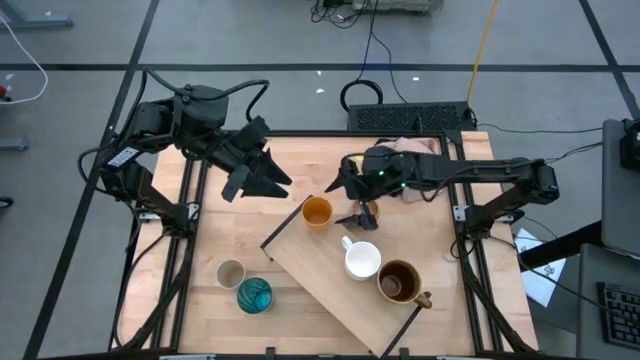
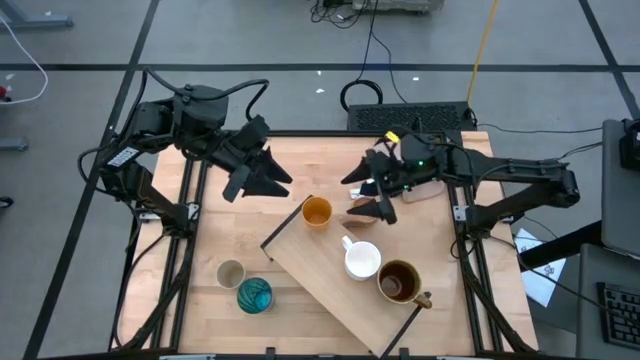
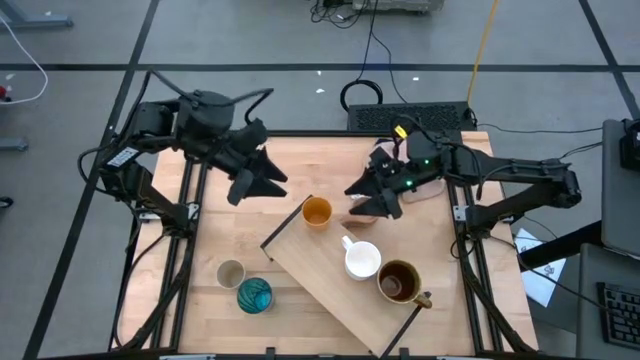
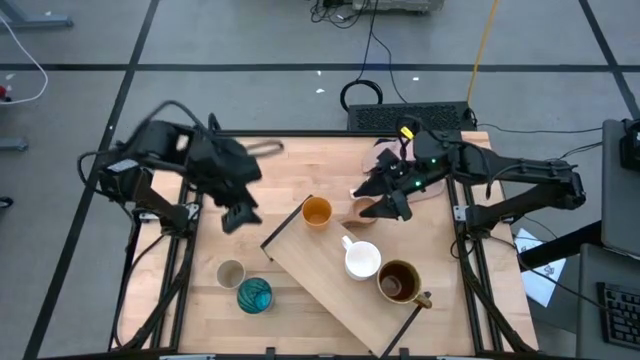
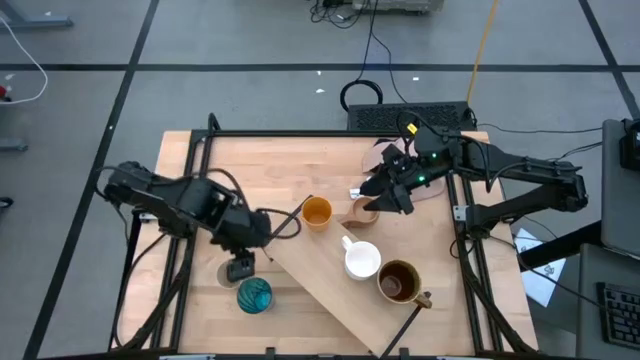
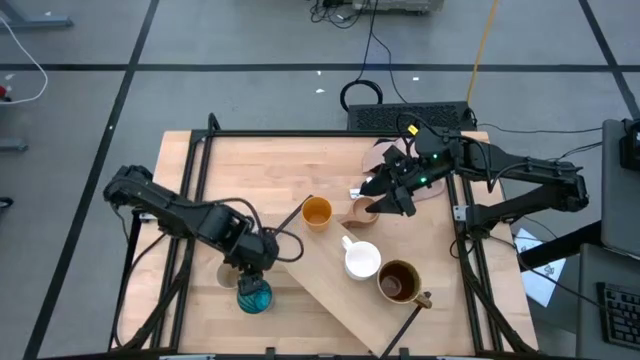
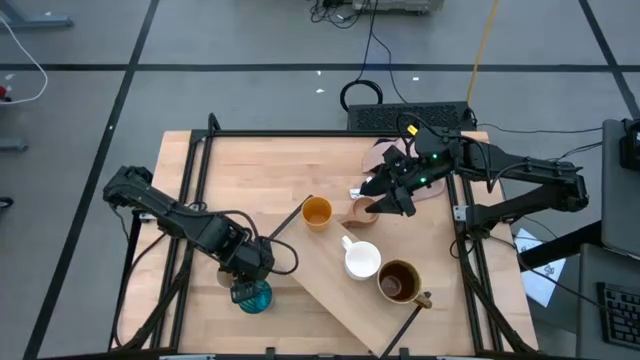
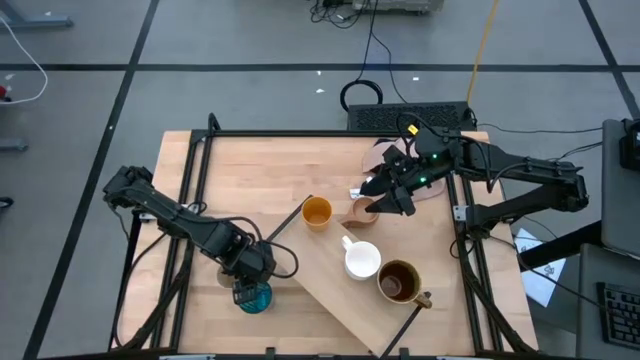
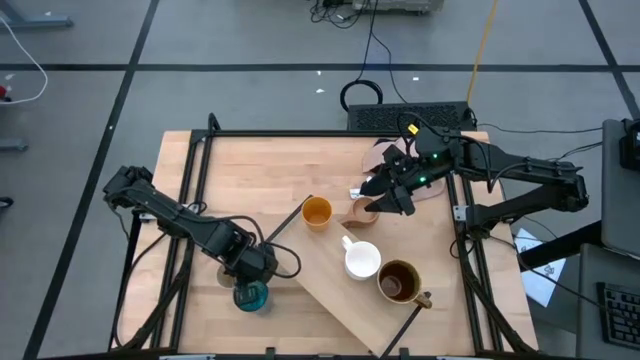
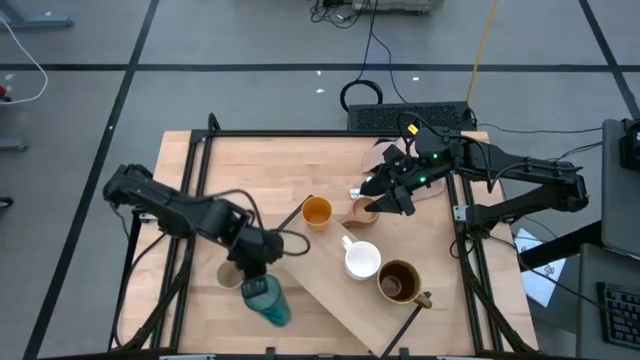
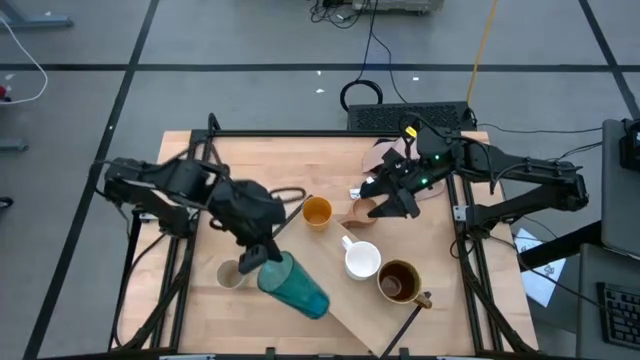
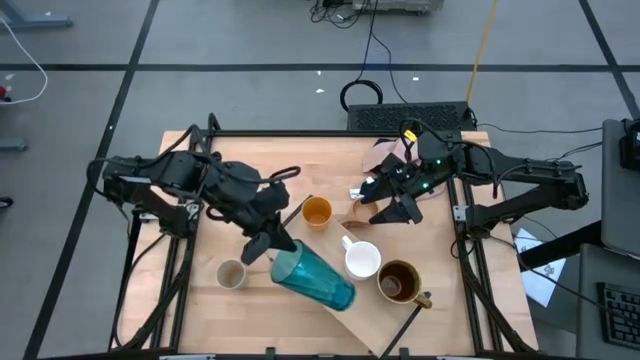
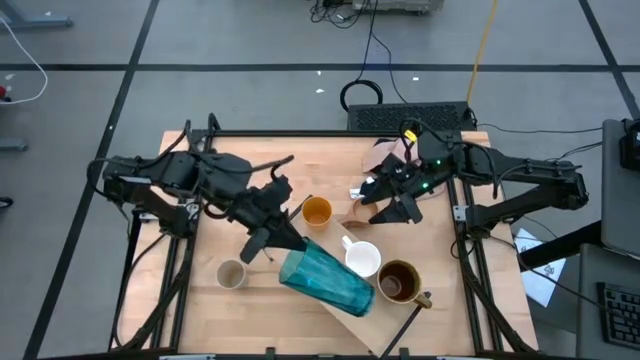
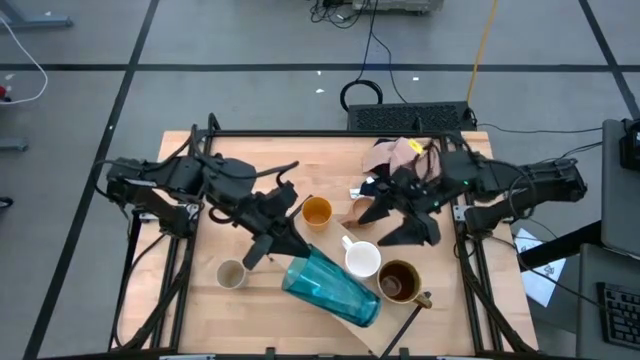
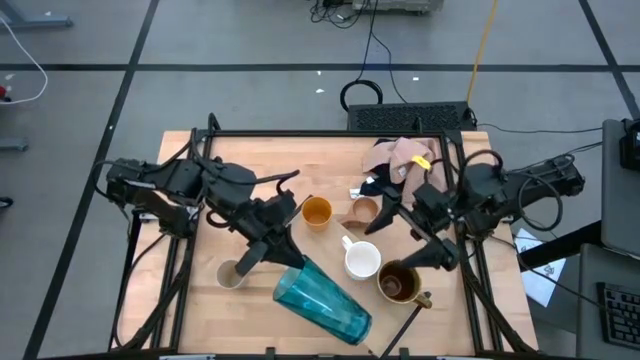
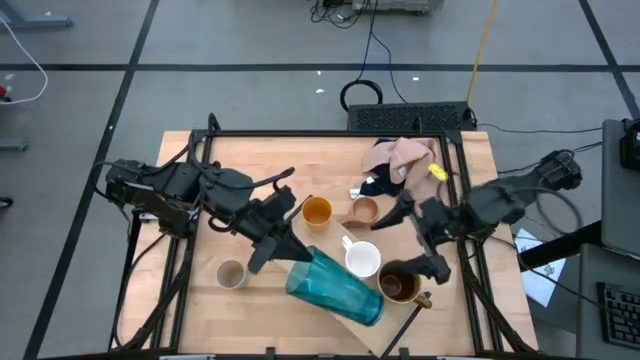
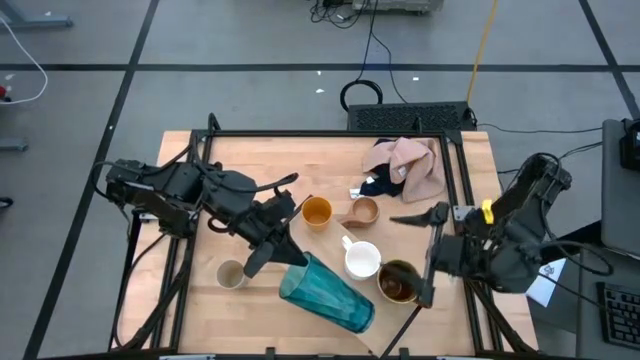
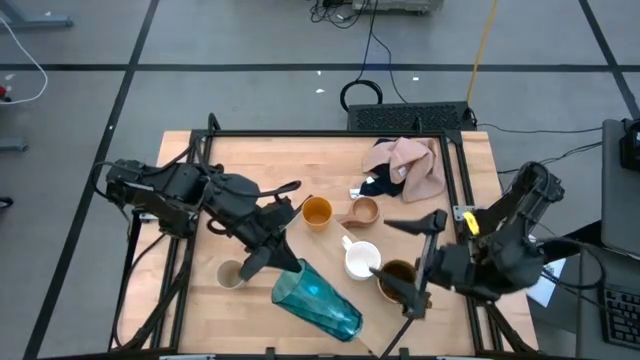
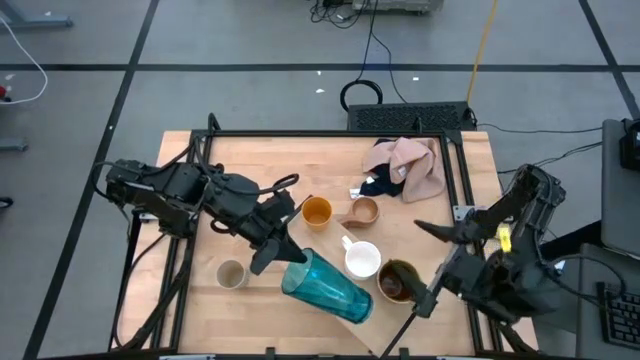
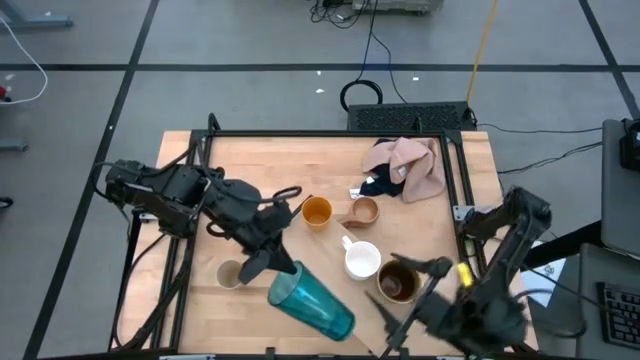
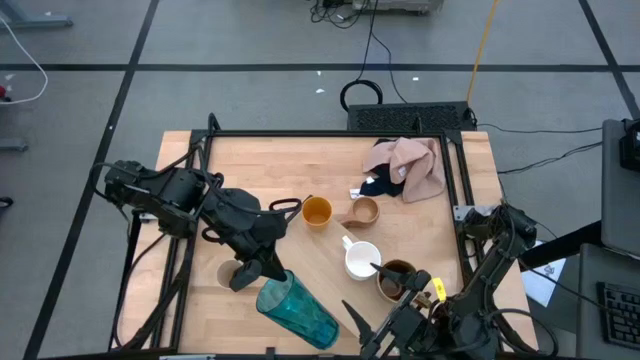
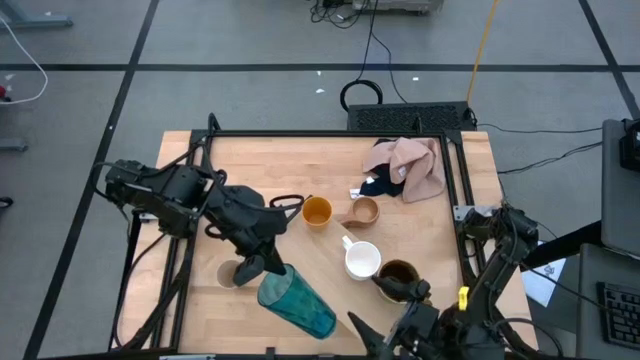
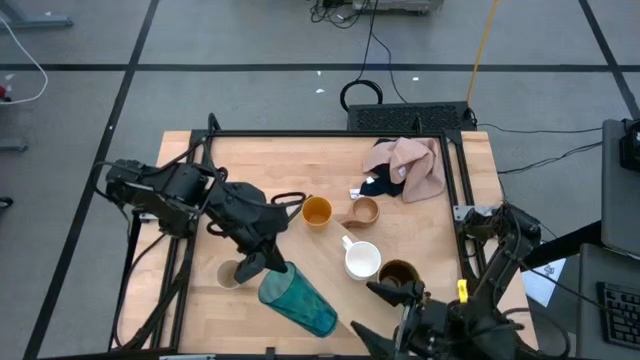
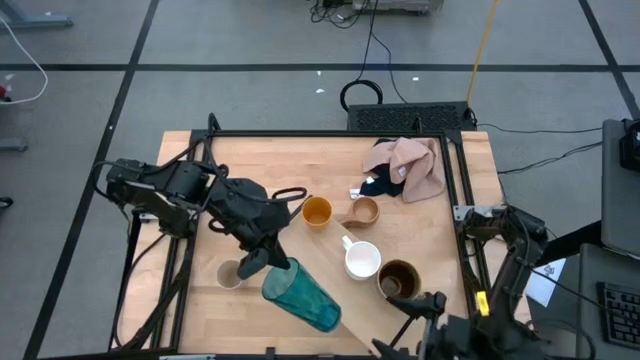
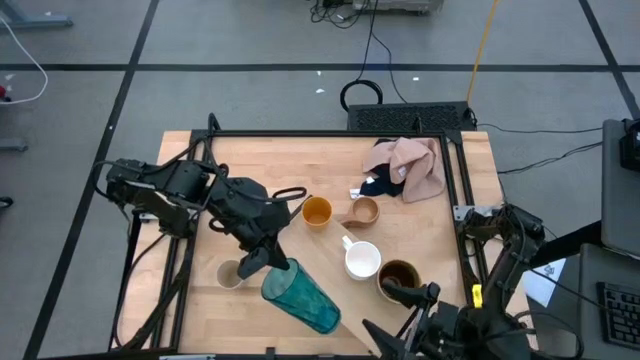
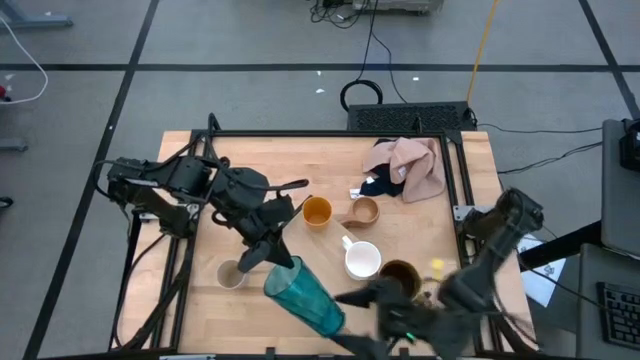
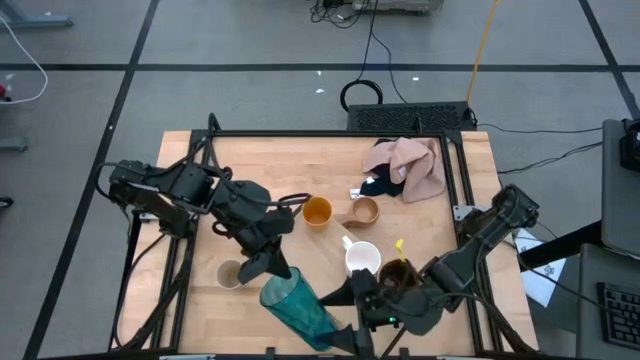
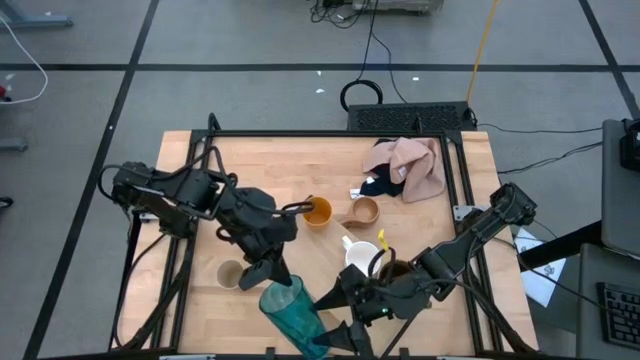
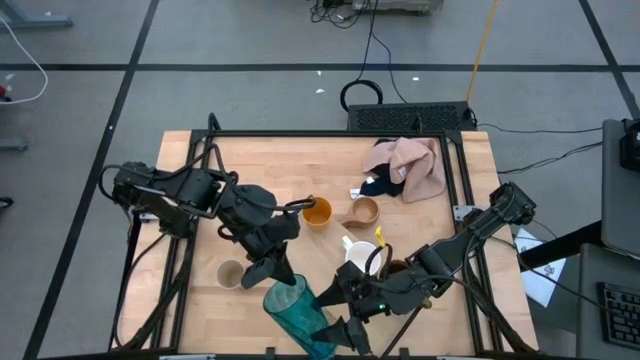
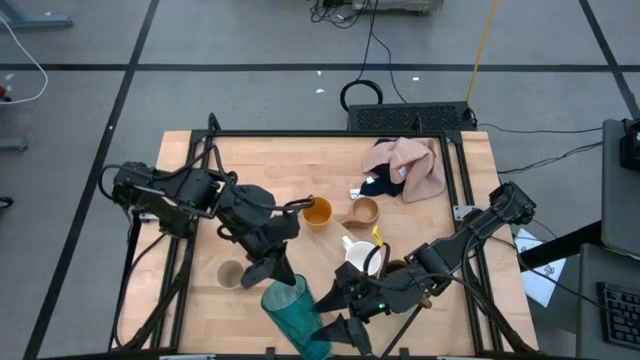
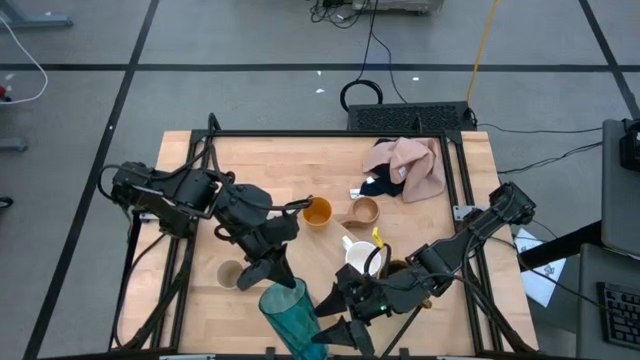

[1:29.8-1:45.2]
Task: Stack small to large cups/mugs on shelf
Put the blue cup on the shelf

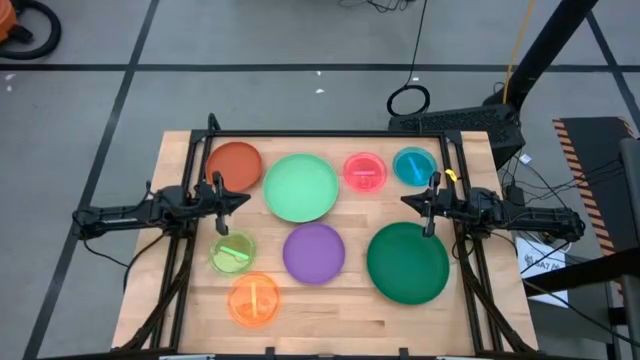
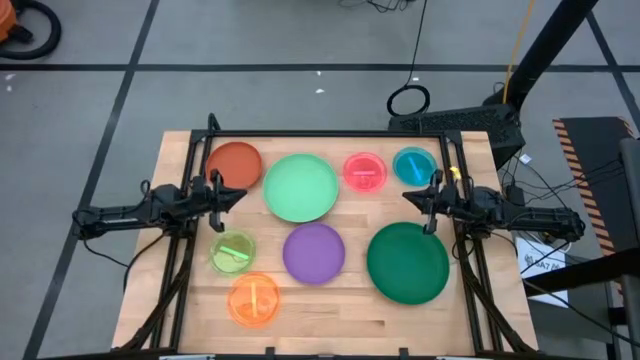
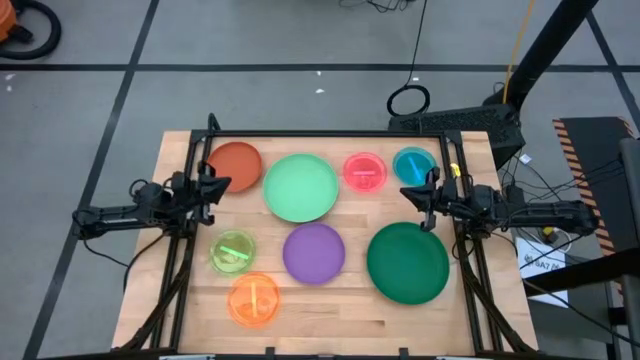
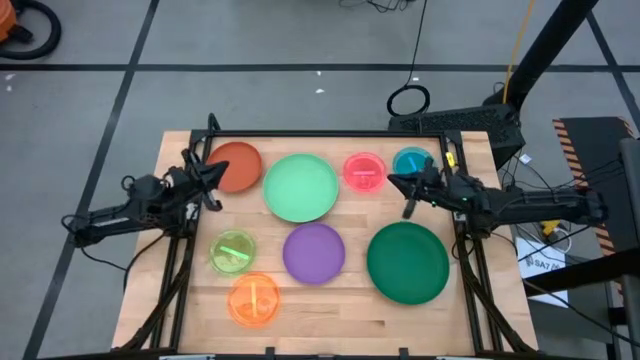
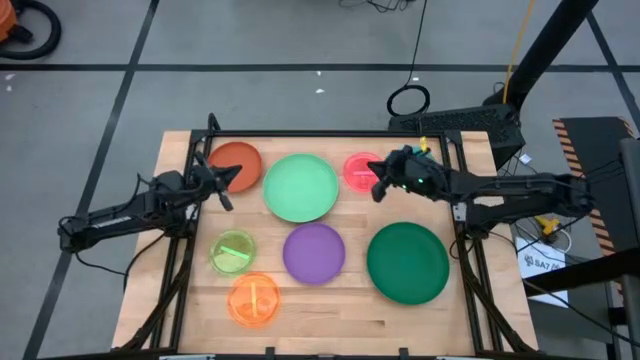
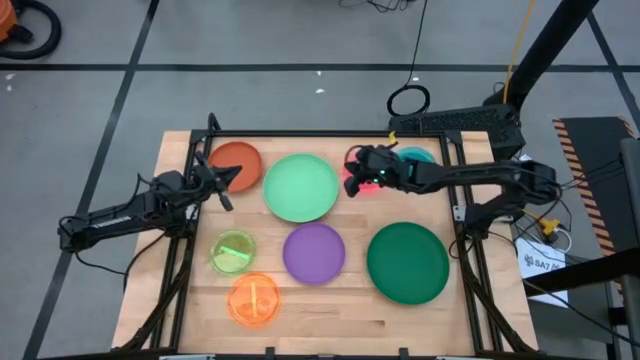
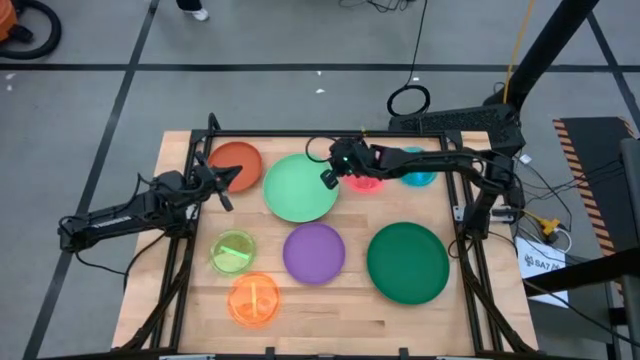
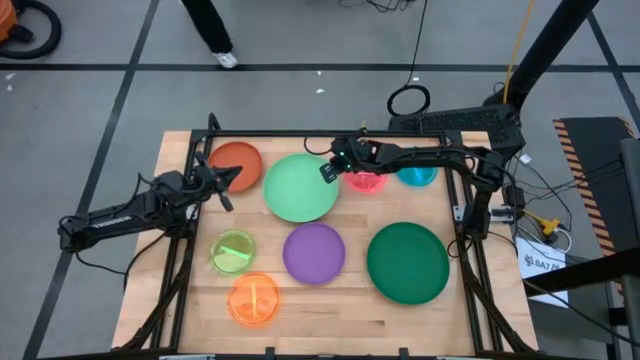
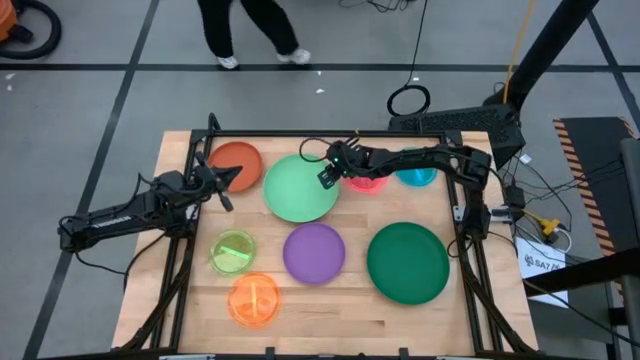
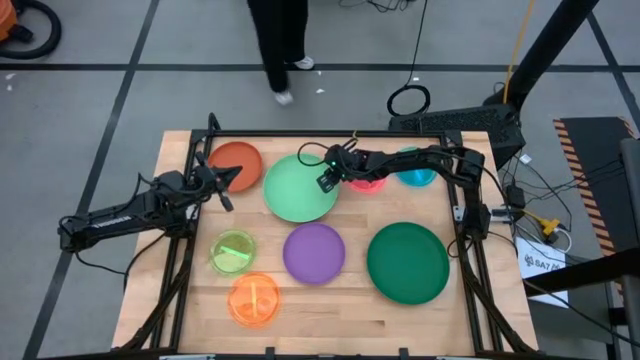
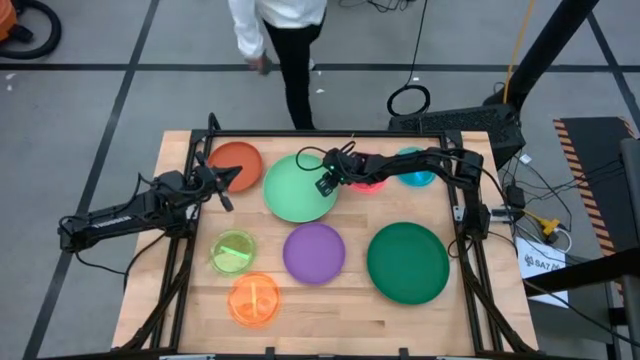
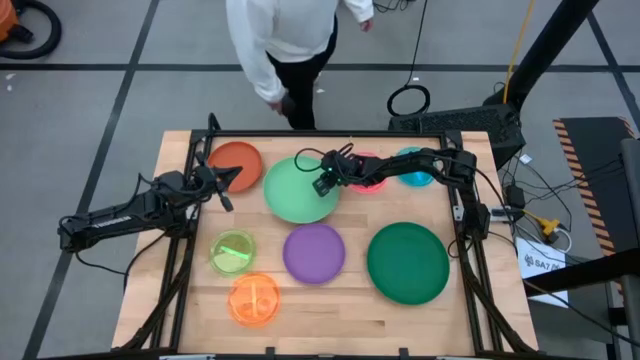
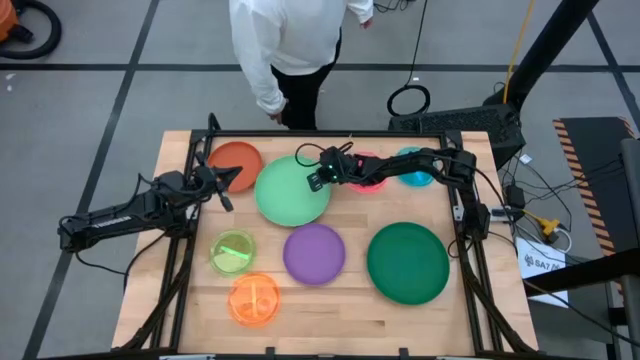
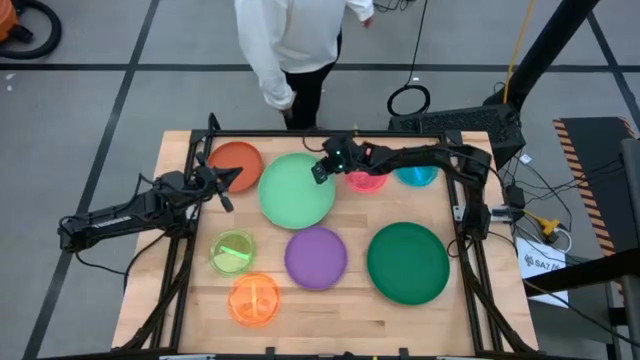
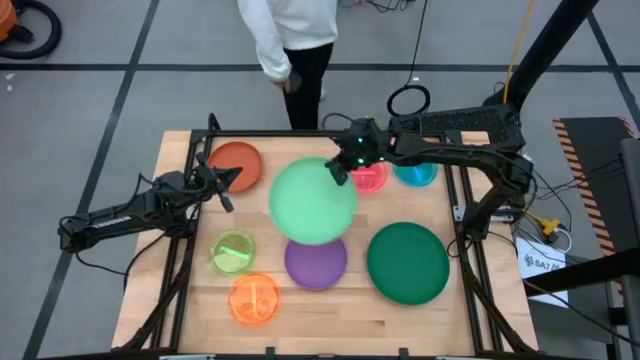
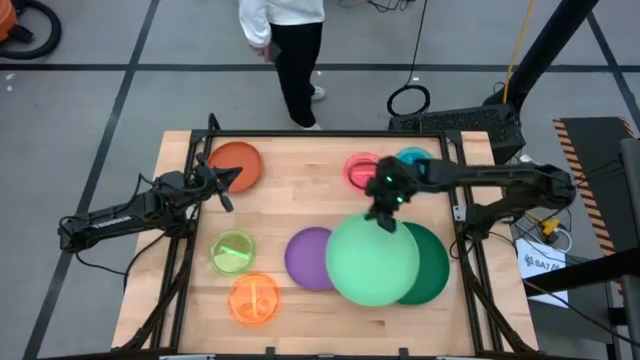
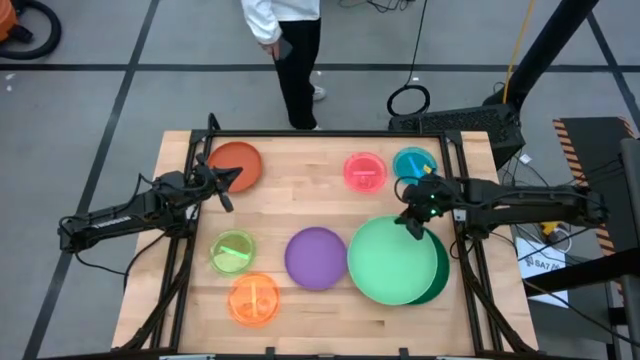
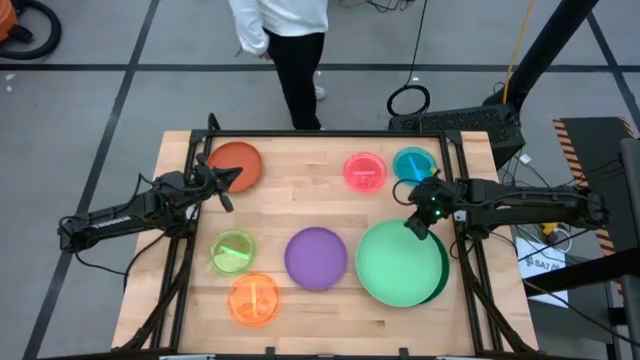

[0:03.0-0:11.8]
Task: Stack plastic plates
Stack the light green plate on top of the dark green plate
